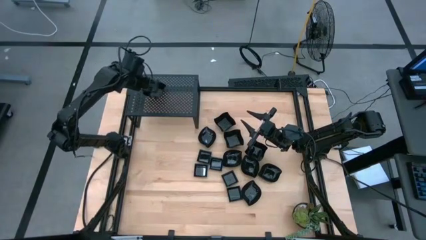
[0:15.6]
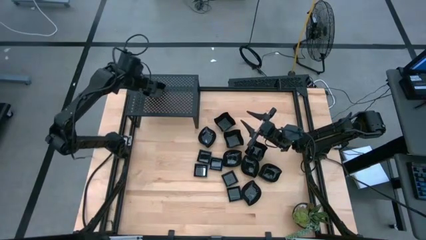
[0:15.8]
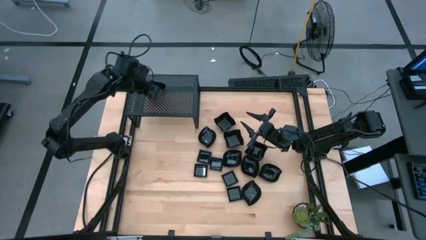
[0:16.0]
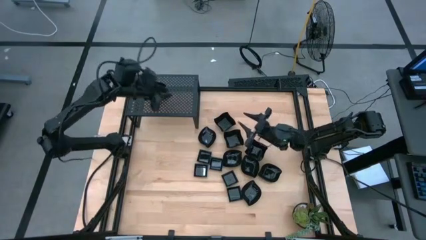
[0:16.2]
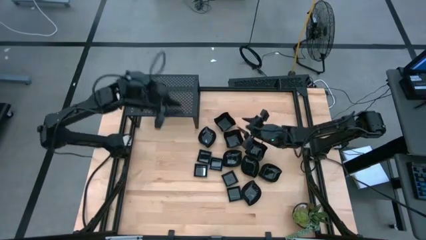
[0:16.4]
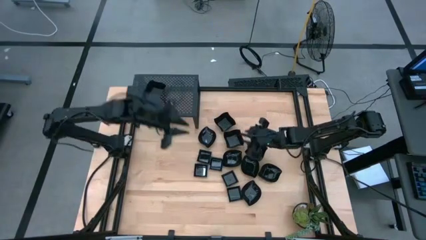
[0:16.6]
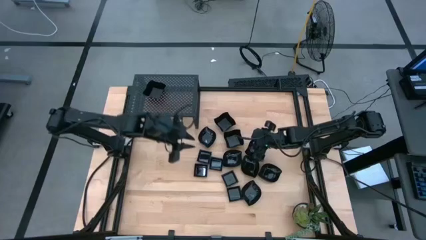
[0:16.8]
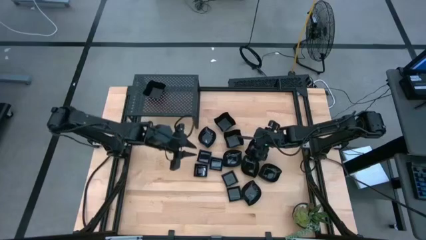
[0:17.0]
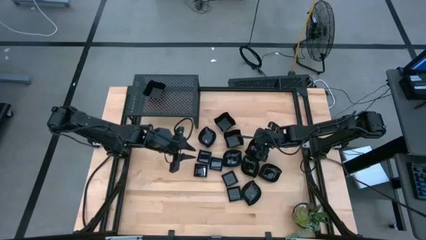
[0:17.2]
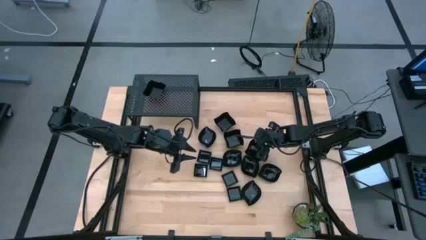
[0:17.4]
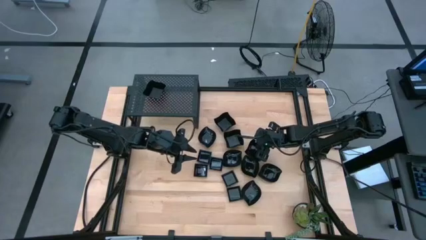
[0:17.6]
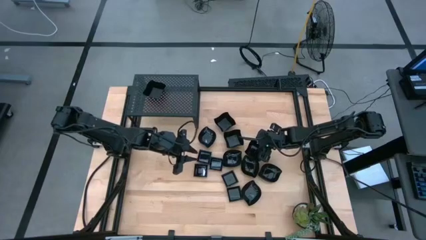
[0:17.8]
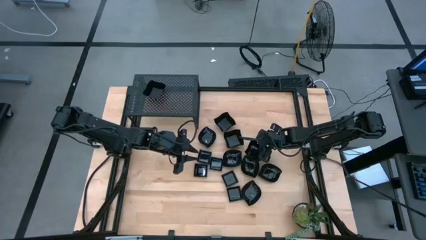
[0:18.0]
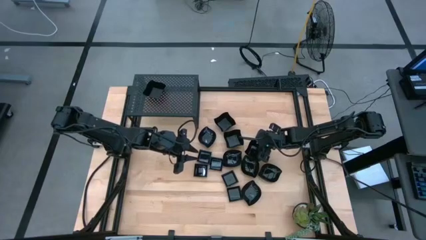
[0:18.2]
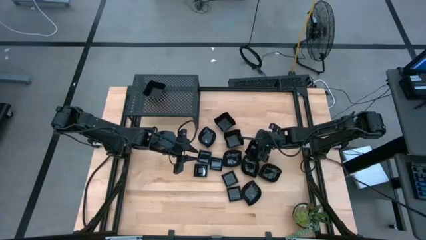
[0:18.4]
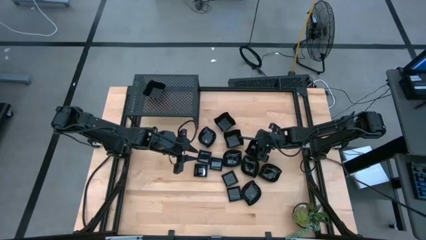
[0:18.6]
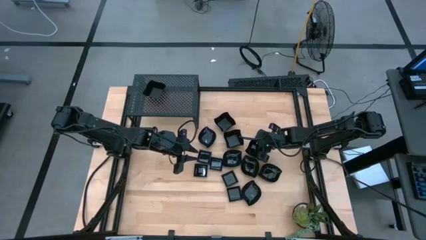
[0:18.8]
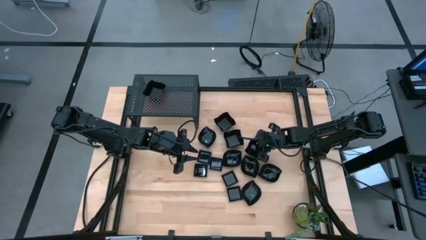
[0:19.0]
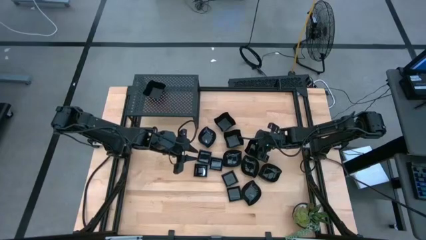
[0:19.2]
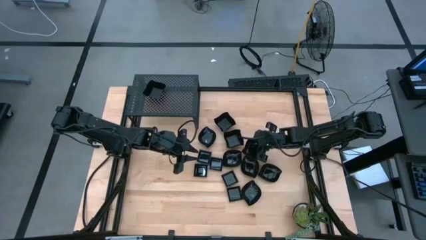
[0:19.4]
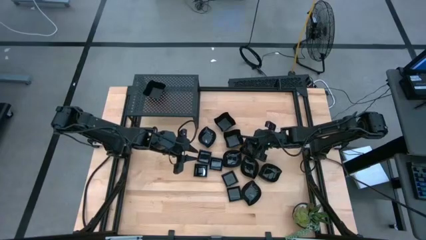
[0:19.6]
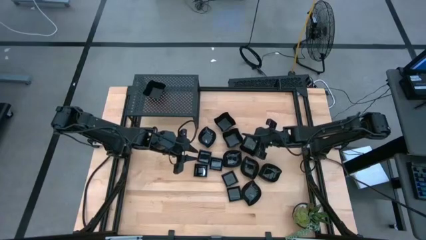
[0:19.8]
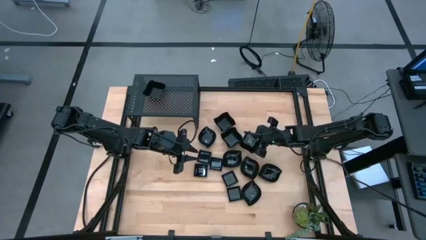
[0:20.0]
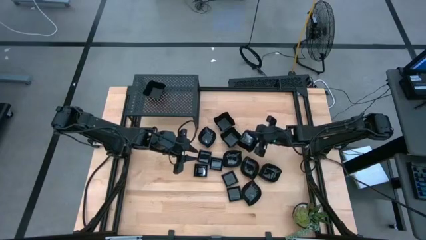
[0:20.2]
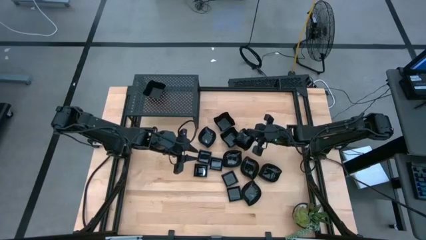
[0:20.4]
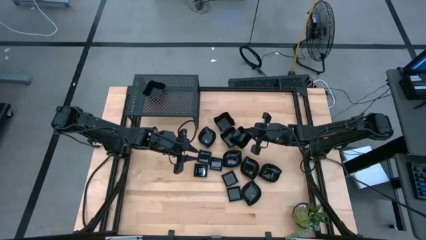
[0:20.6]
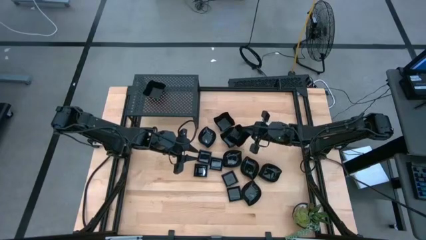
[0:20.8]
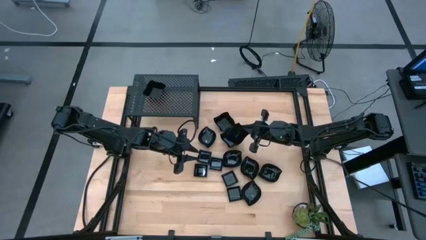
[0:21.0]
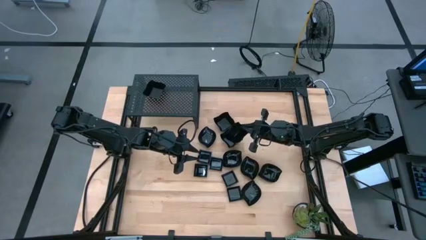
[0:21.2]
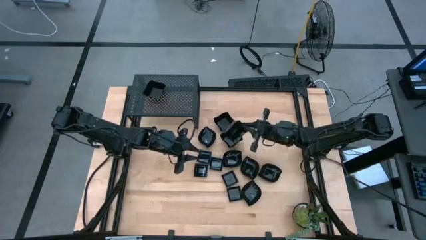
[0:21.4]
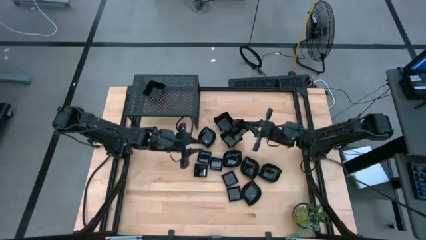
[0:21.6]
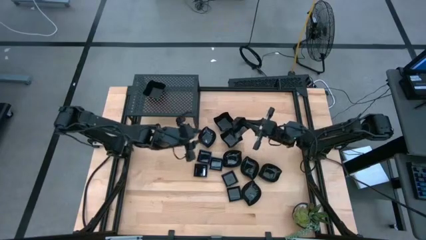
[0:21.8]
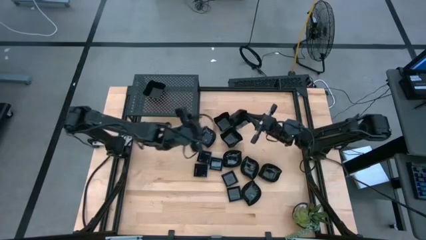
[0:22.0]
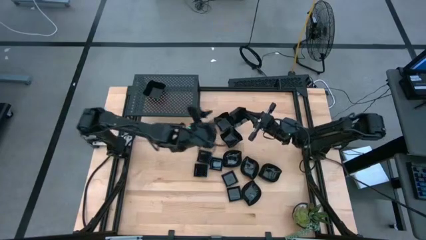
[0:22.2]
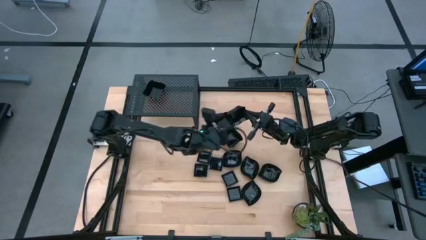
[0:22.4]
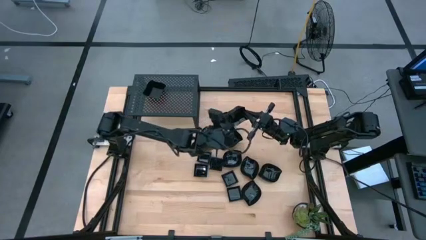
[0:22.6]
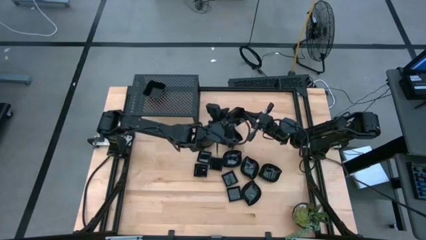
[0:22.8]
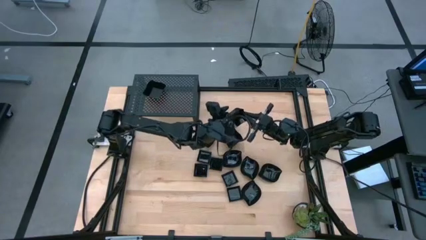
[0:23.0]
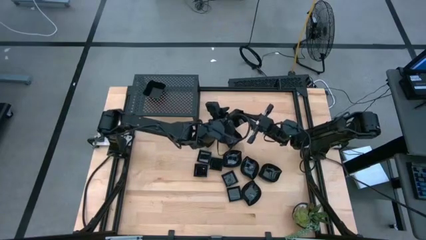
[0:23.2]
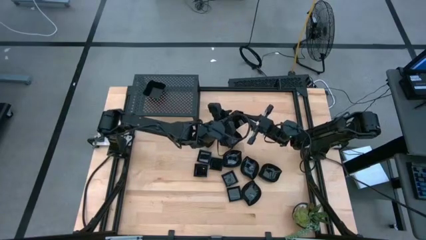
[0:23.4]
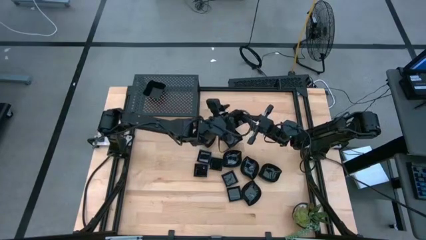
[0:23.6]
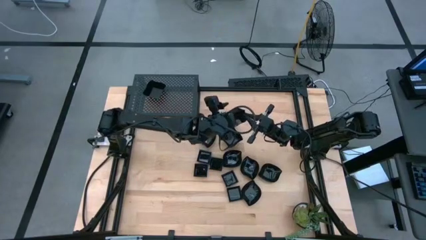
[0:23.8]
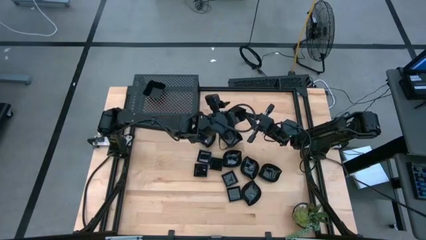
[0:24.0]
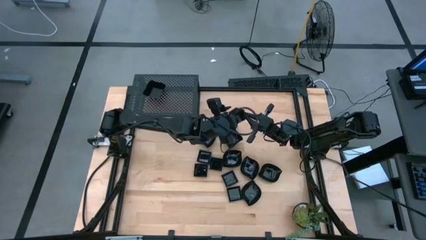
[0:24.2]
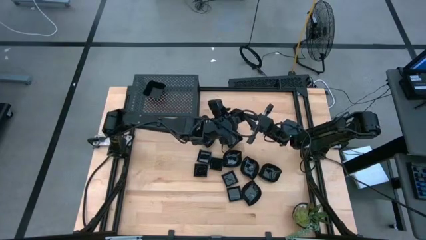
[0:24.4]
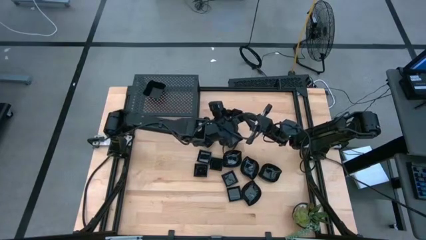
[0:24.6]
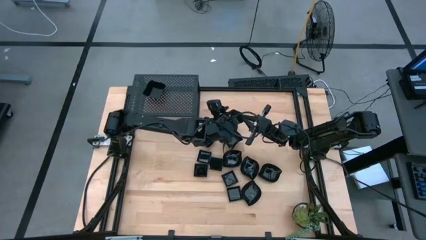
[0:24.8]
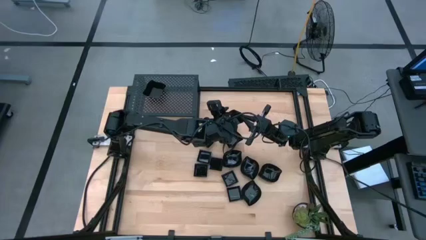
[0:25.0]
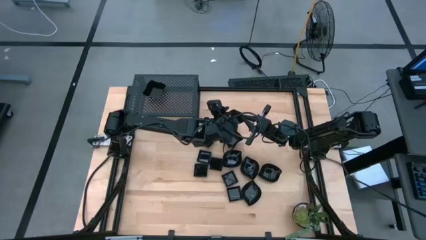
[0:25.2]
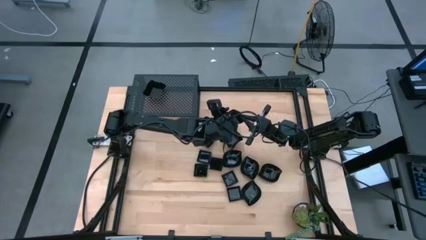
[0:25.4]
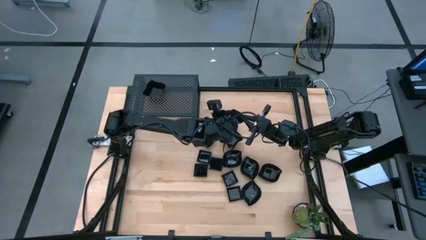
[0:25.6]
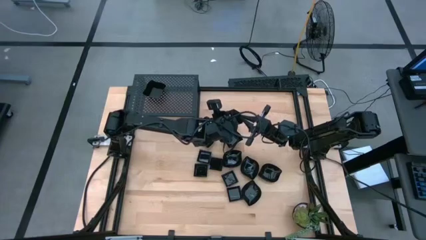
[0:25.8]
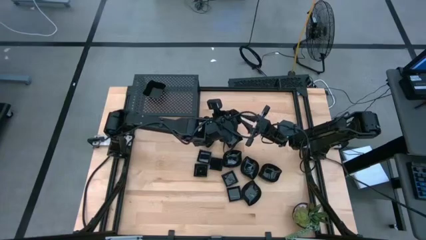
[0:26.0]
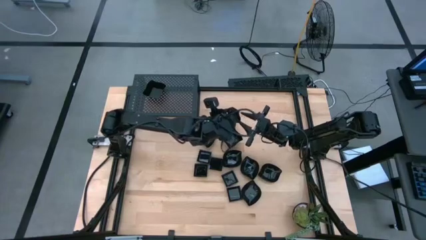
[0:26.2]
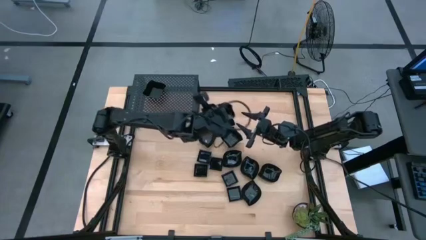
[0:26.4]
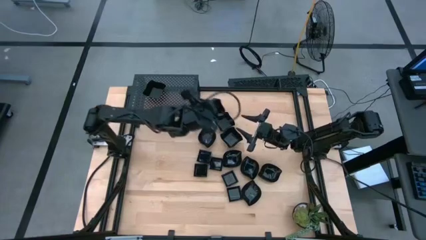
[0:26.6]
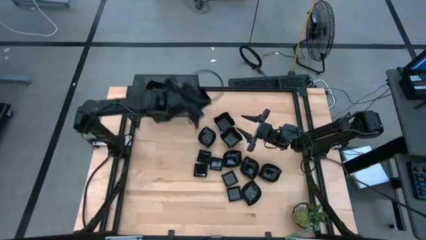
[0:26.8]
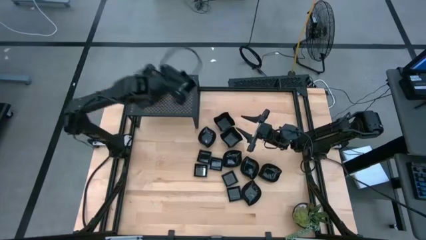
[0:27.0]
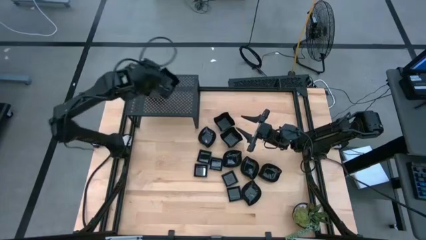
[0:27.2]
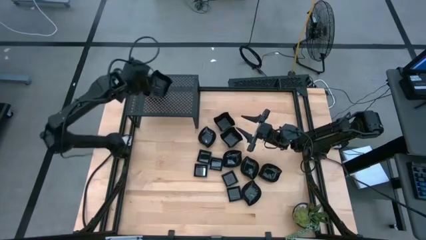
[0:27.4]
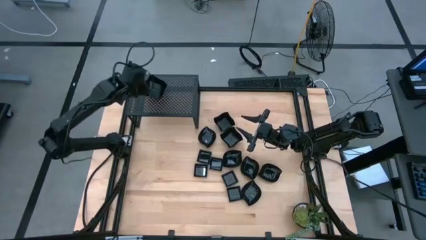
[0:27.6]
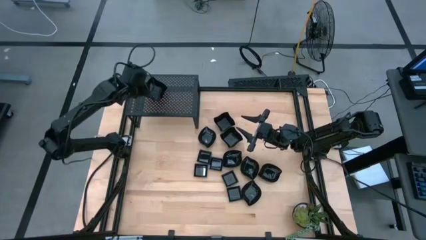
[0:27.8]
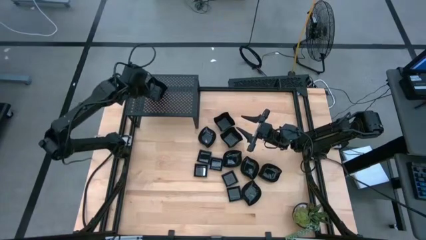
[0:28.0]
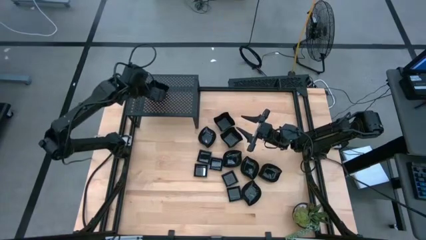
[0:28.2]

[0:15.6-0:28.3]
Task: Pick & Place Mini shaped plates
Stack the distorted square plate on top of the distorted square plate on the shelf
